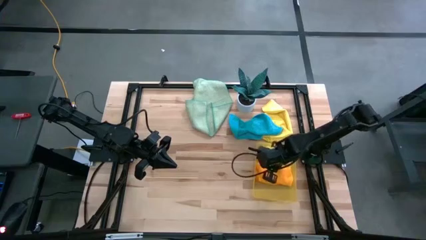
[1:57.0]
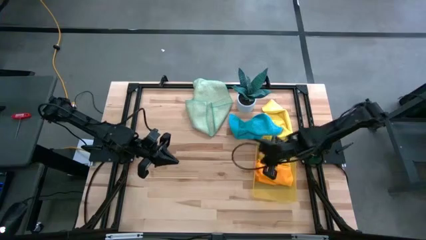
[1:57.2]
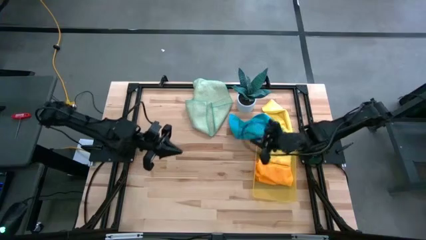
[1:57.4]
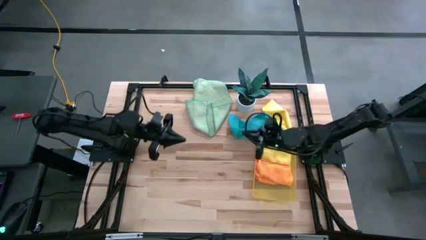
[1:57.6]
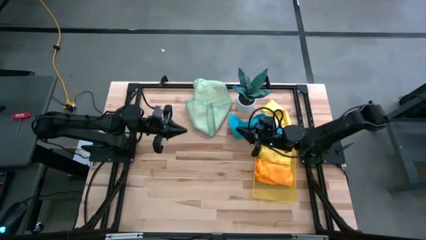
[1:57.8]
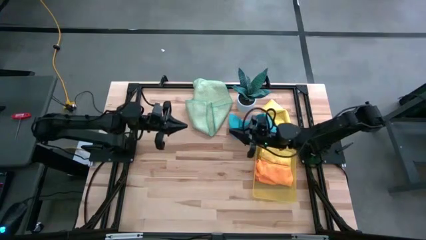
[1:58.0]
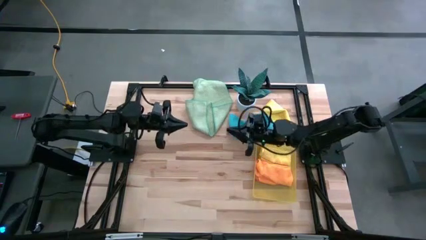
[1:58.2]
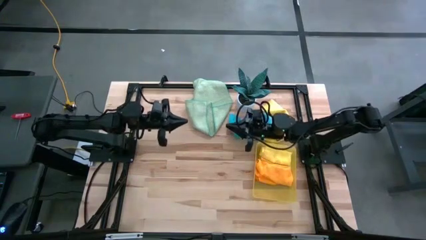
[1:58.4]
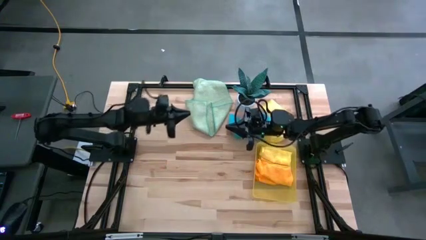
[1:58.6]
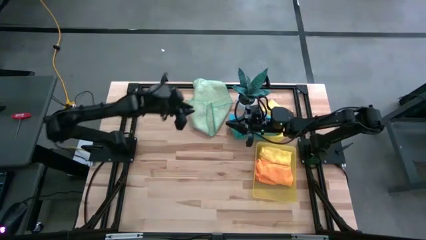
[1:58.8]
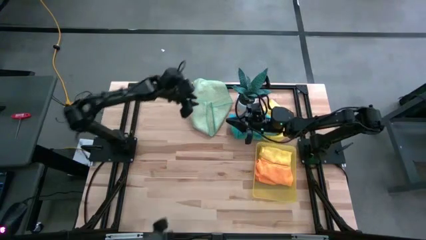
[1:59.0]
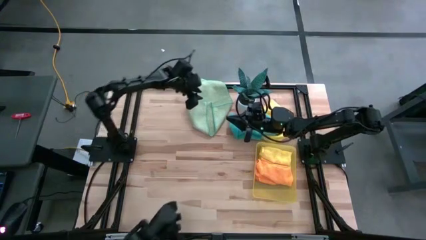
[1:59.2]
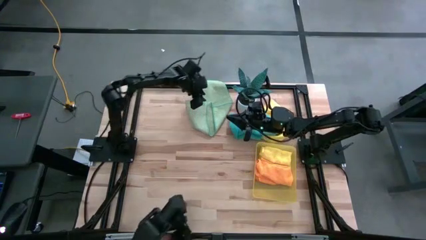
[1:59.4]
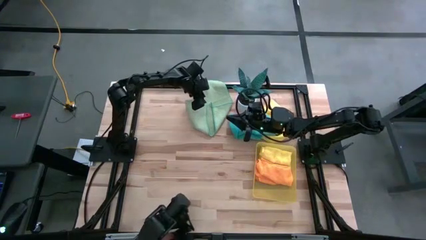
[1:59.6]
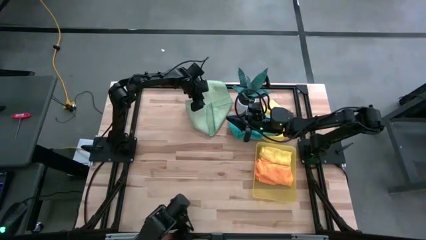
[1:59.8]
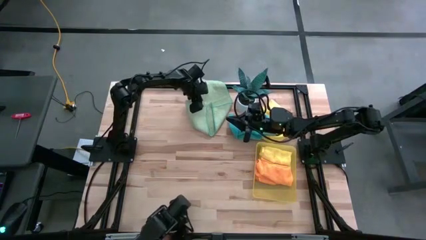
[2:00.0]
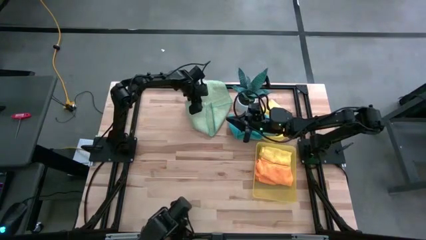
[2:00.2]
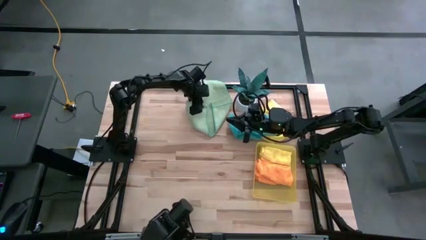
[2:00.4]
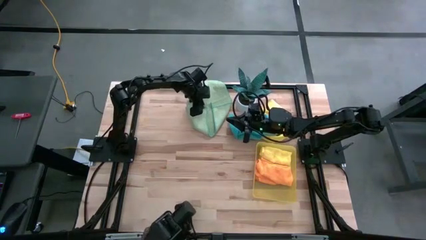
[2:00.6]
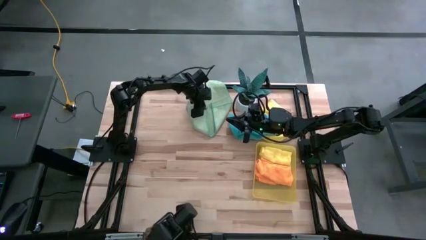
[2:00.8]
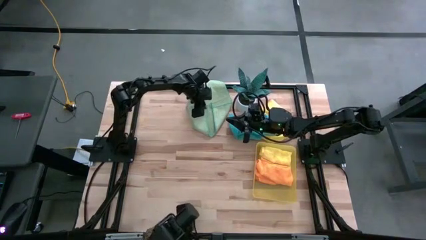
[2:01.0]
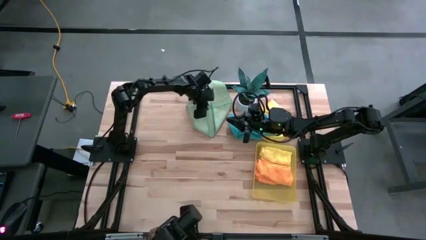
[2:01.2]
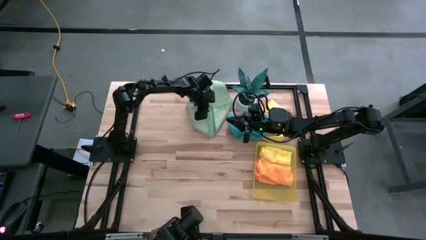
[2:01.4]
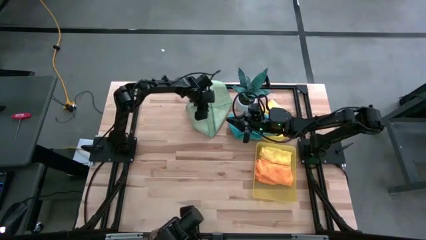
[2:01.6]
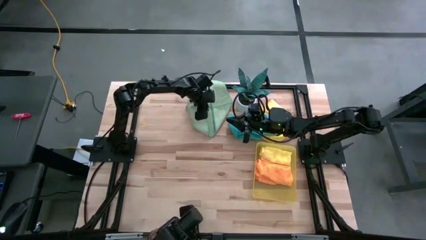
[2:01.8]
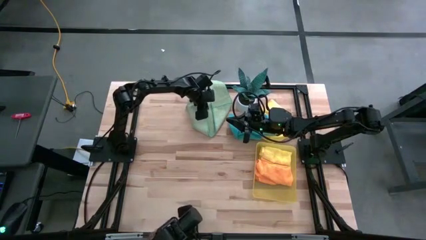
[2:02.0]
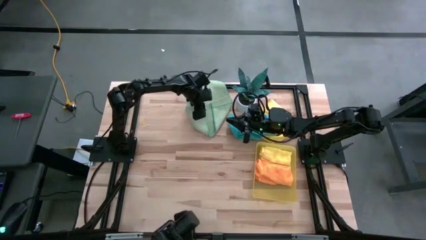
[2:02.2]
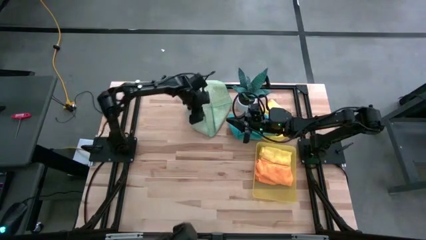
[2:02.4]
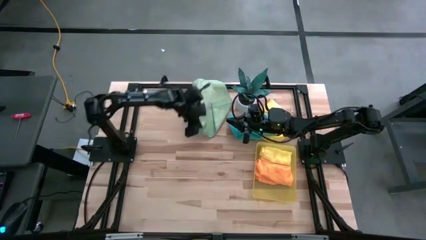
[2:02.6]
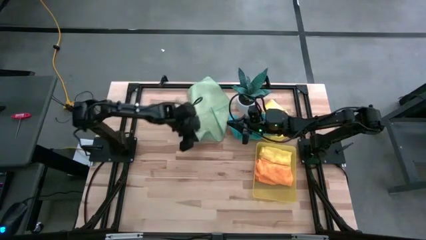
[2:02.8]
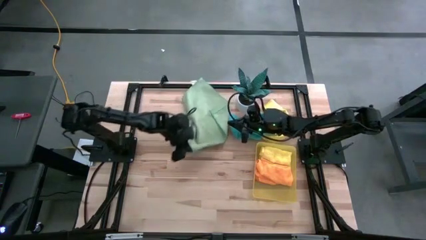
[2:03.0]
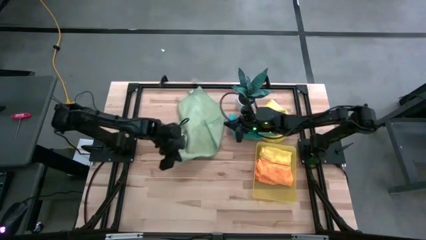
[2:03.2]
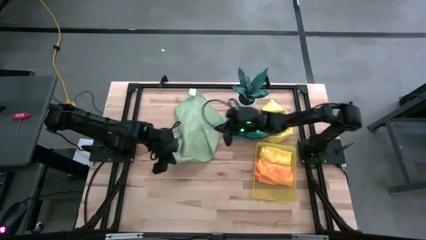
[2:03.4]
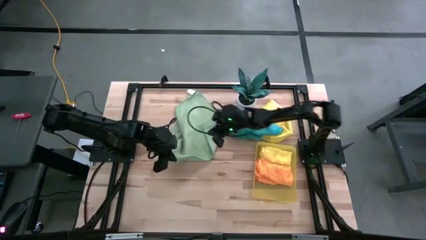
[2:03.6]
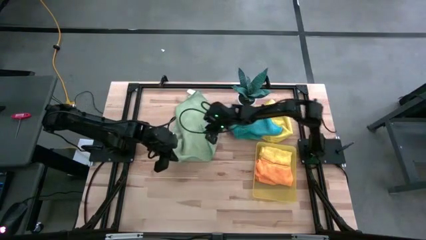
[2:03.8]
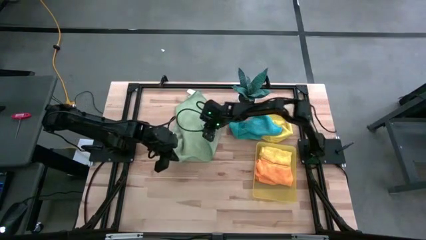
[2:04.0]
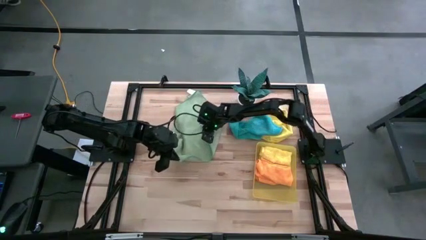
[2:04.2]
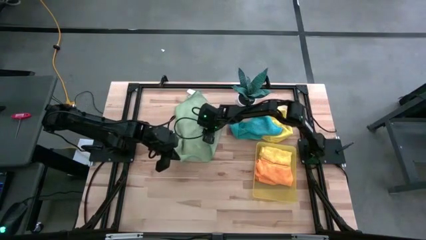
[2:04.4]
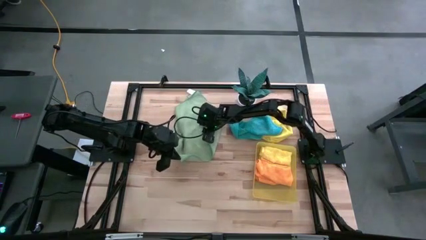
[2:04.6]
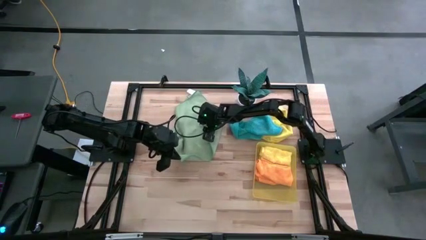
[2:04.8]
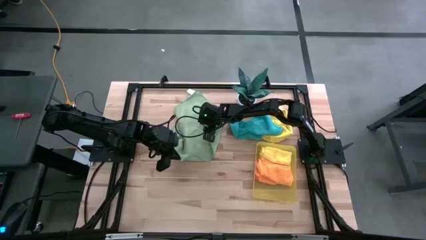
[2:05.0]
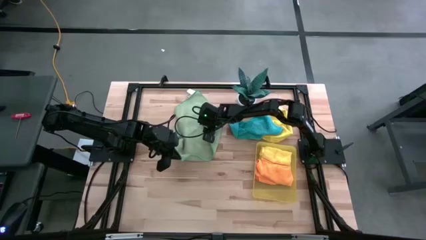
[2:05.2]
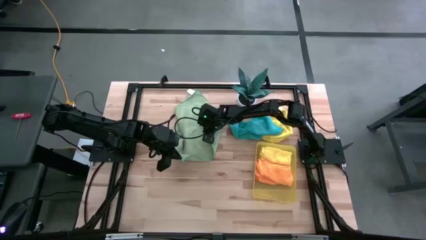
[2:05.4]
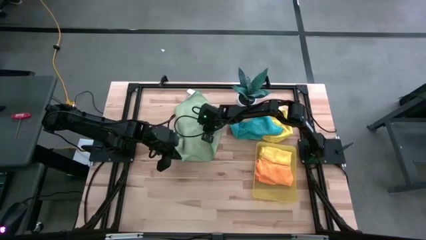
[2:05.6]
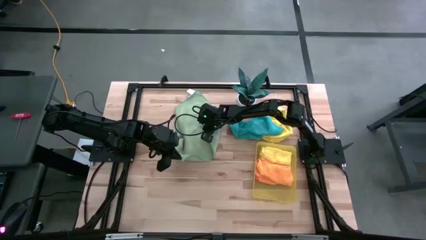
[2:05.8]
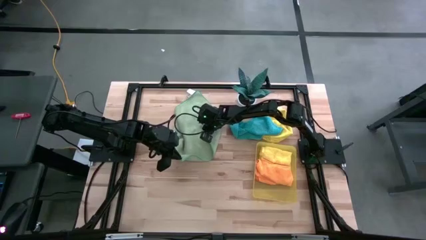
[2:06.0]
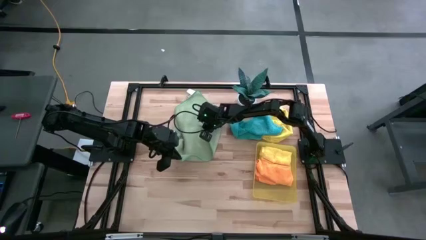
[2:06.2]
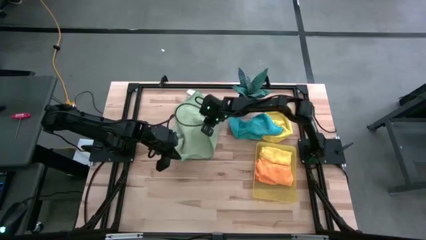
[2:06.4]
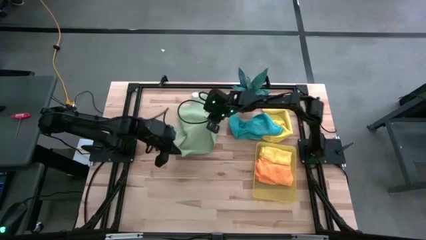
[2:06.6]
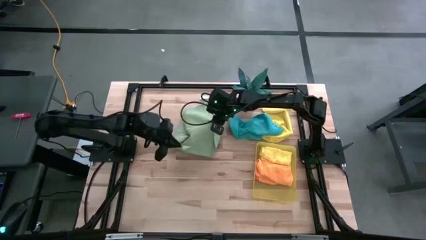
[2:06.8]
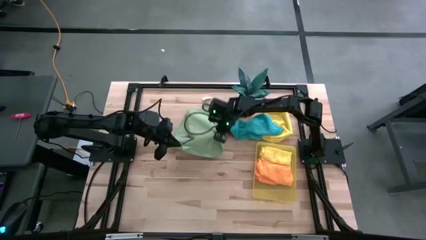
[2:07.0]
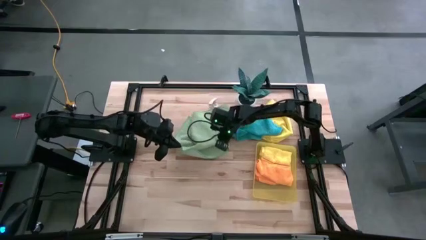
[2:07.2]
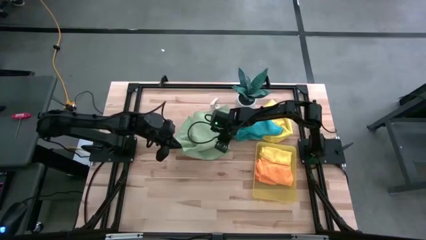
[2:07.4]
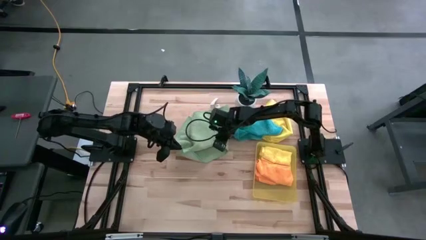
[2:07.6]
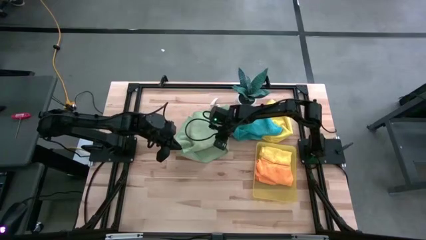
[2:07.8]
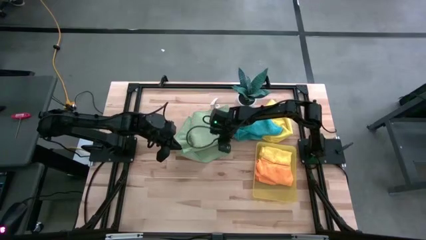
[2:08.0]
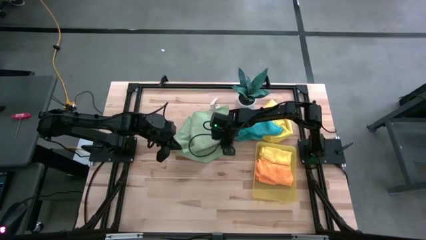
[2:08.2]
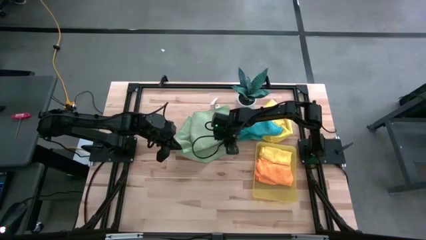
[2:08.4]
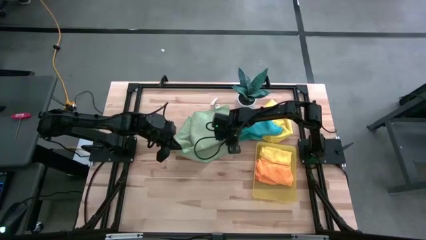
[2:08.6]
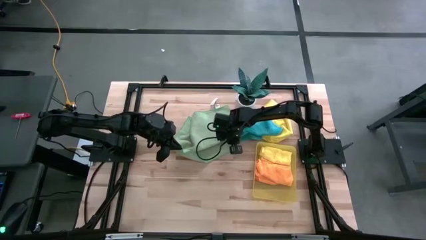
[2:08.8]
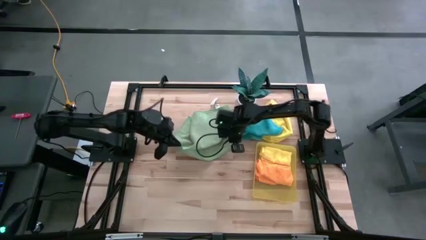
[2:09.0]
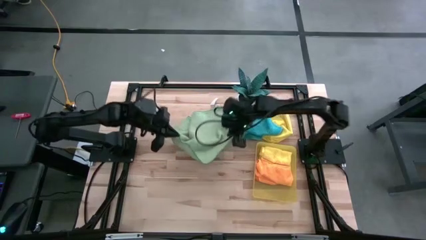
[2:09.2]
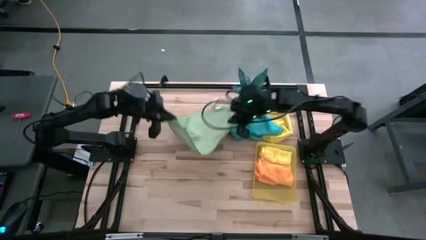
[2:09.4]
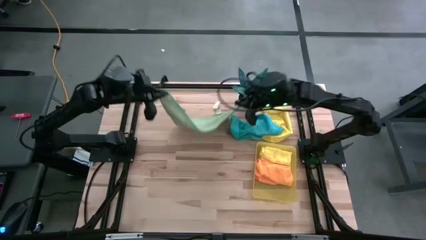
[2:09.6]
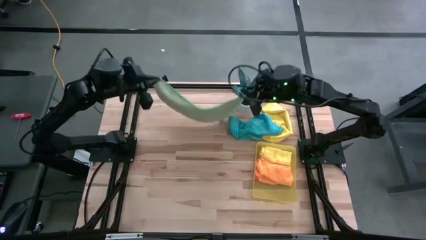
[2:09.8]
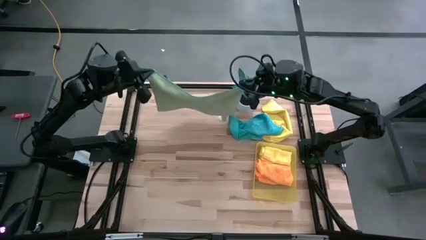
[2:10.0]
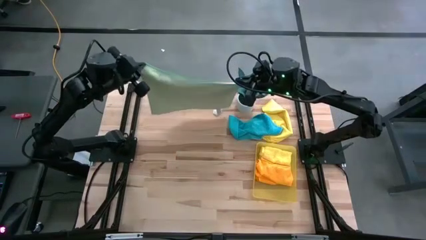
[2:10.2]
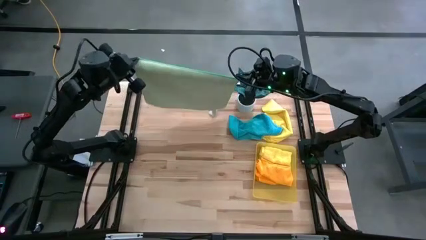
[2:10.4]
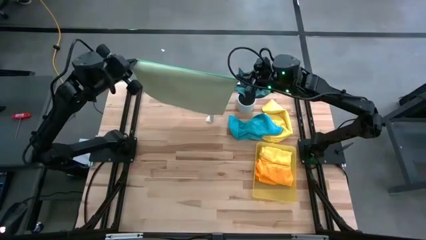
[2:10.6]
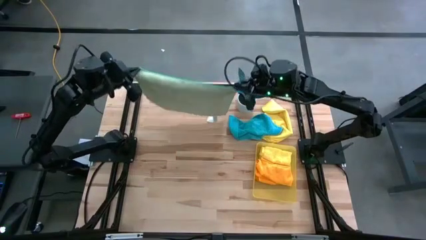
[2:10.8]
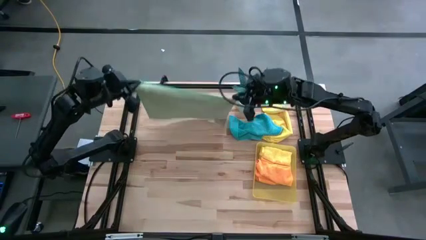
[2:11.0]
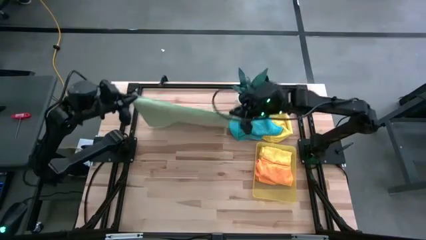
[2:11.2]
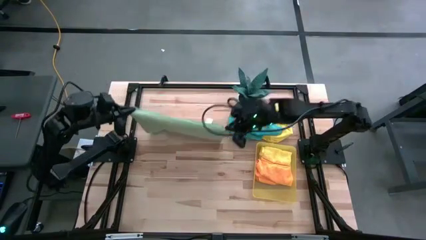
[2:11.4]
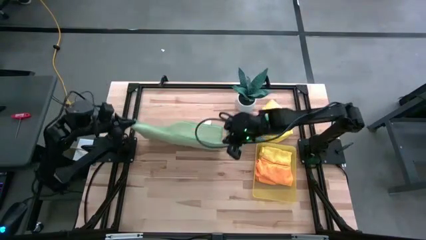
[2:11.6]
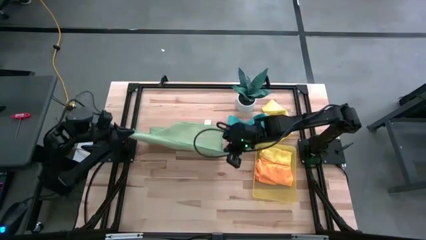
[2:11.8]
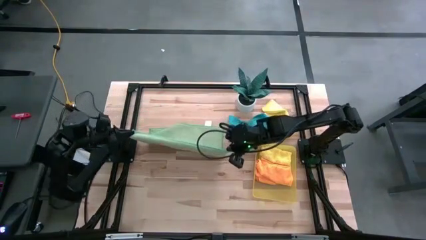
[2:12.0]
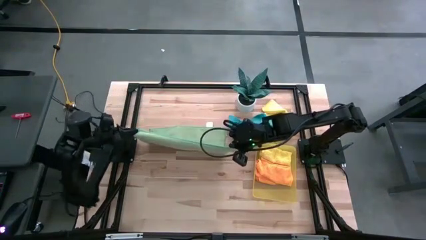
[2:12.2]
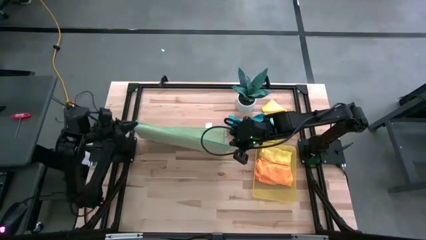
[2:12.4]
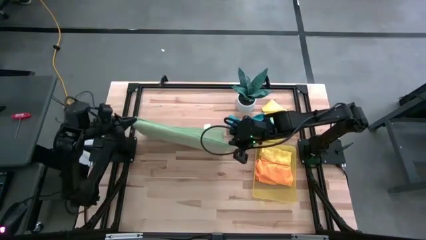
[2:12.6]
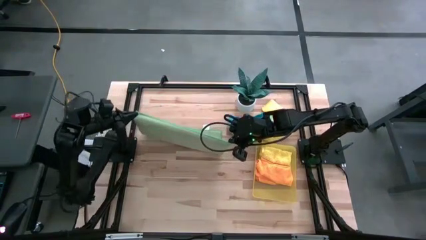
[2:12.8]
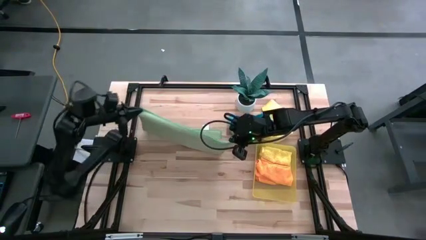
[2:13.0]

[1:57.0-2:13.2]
Task: Fold microfiber towels
Fold the light green microfiber cloth
